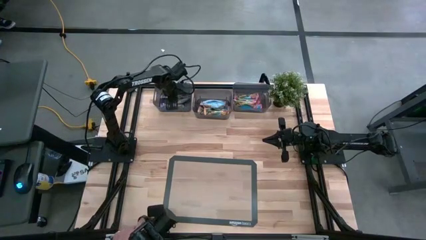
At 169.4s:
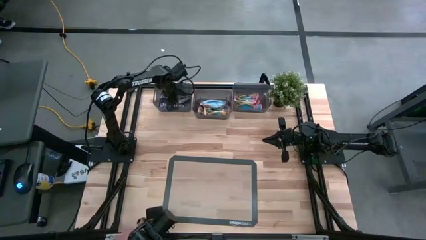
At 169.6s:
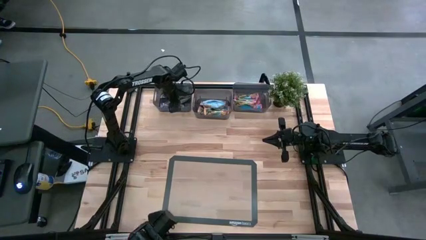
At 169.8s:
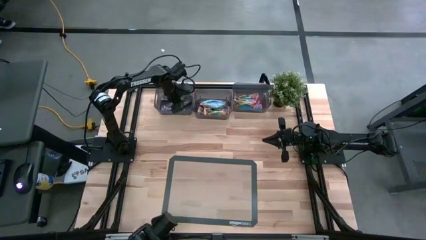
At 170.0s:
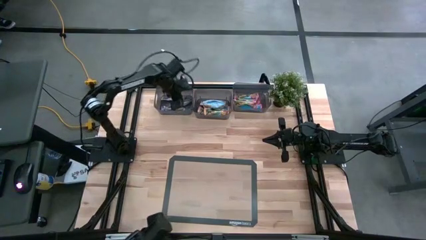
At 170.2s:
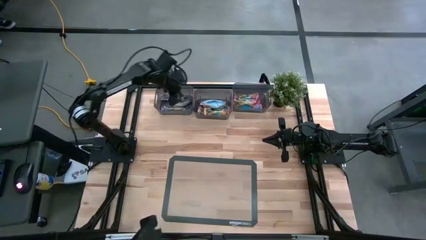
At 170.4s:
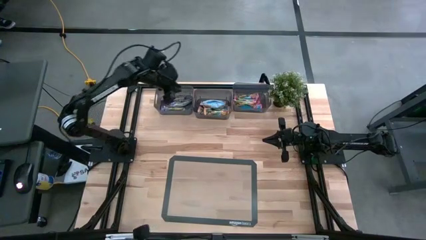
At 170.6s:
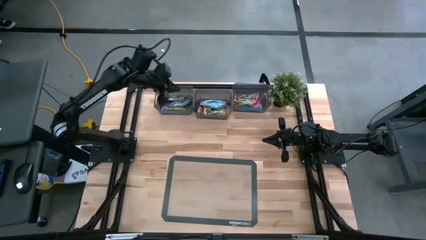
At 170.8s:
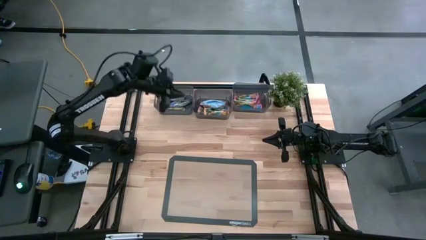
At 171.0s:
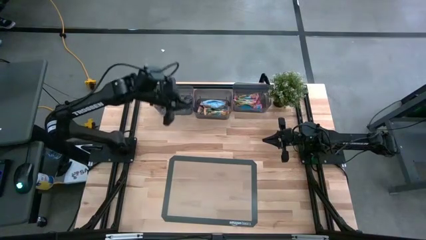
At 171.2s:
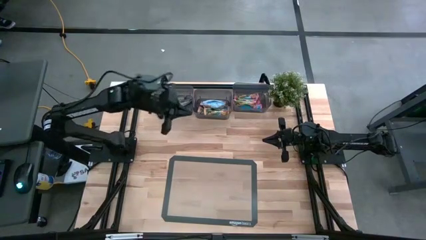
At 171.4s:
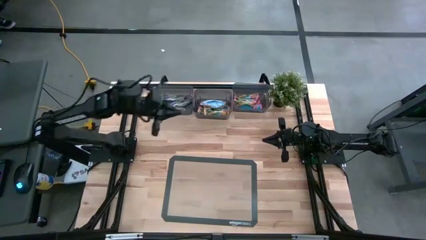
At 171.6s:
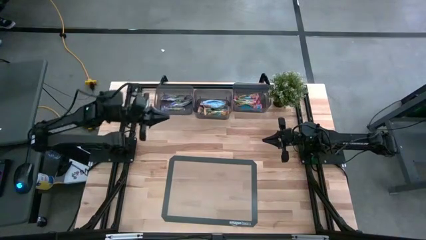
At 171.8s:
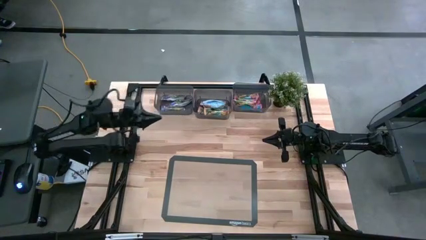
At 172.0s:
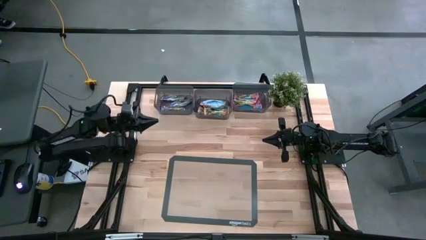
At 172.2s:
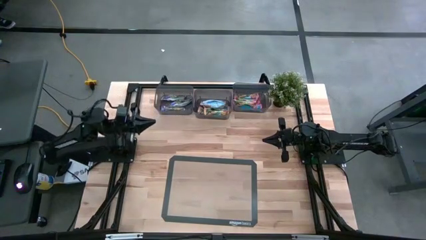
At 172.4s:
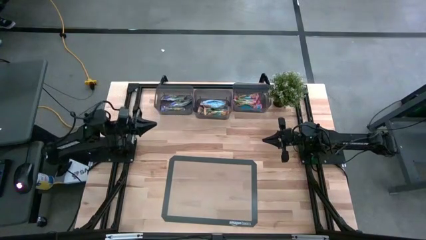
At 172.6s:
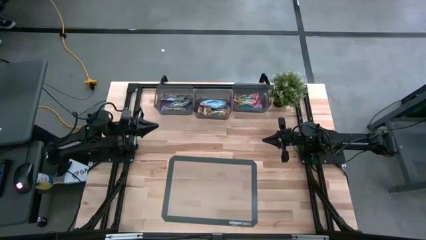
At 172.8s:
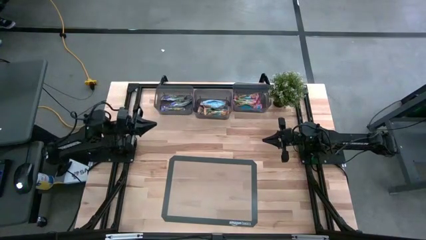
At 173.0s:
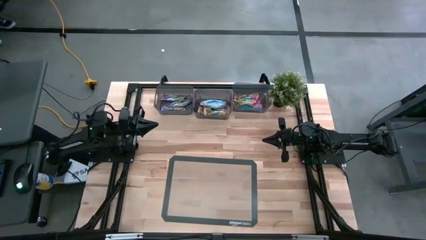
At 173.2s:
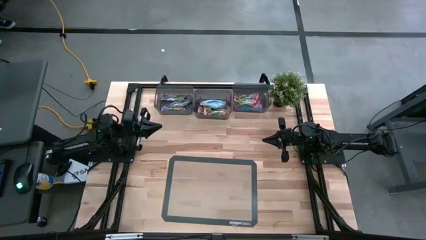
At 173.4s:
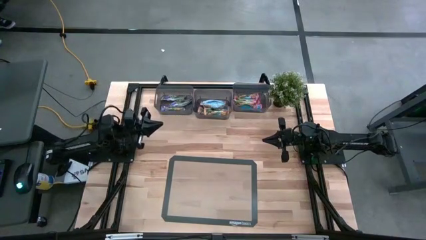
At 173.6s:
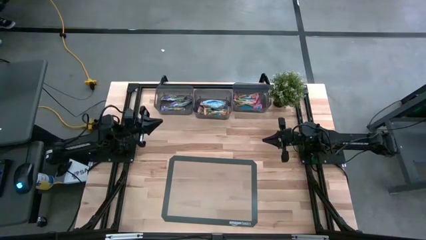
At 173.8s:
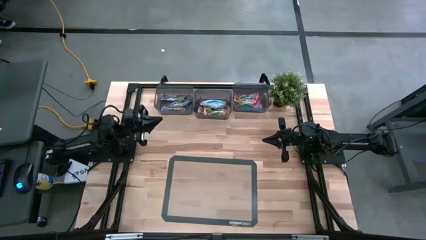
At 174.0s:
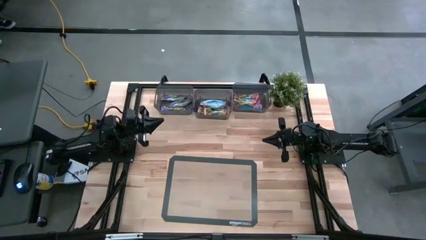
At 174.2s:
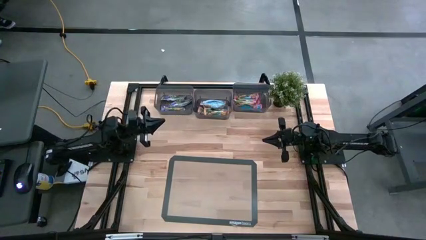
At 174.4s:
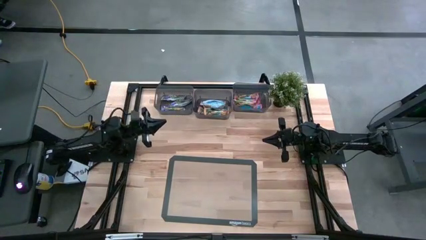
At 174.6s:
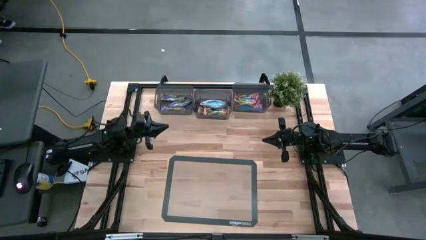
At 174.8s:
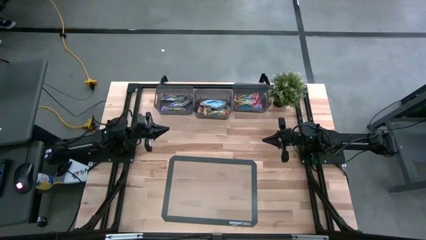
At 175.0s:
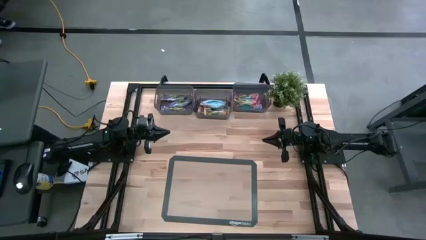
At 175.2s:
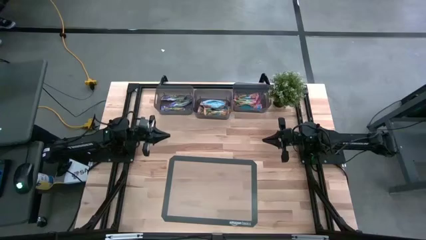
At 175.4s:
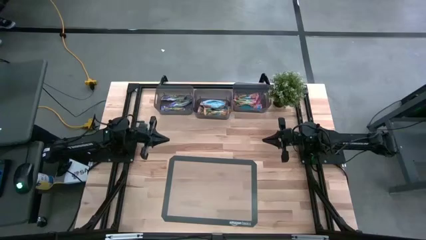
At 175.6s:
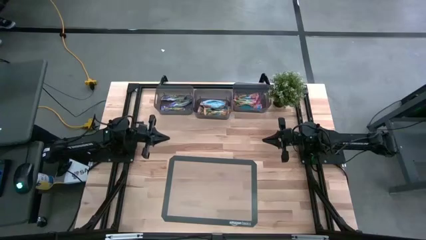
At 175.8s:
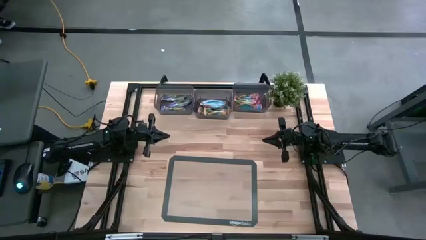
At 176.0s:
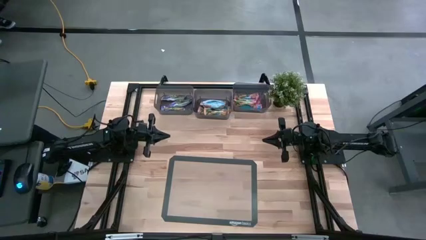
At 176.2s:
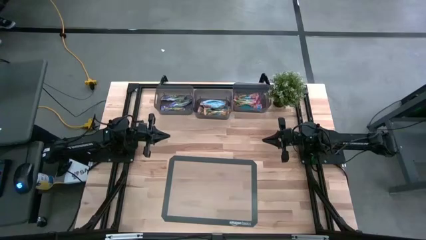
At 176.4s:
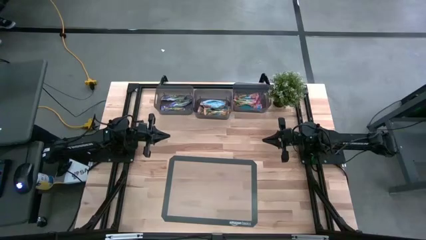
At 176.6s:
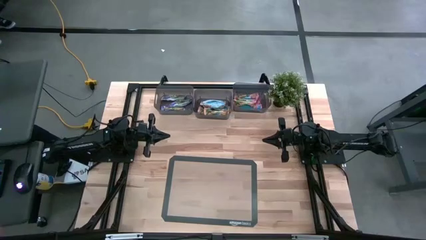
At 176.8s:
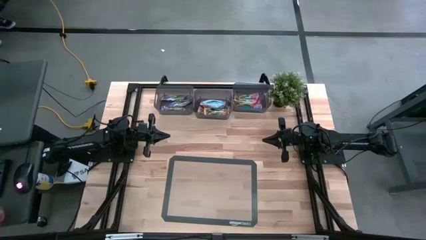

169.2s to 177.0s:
Task: Pick and place Granola Bars by type
Return to Home Position

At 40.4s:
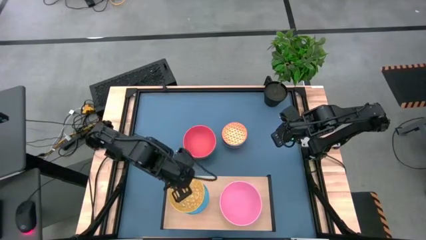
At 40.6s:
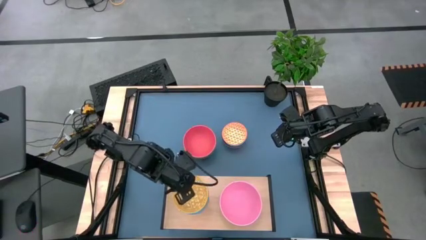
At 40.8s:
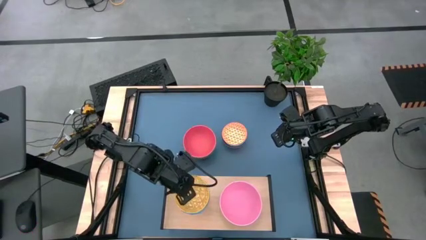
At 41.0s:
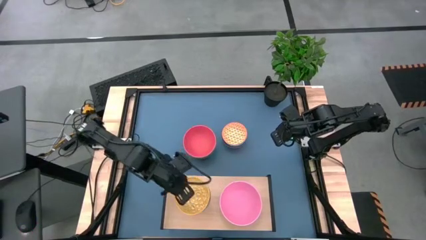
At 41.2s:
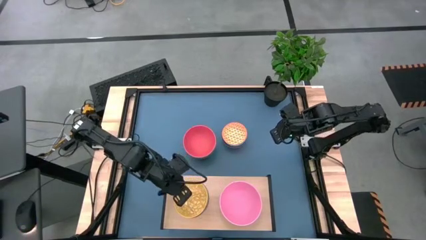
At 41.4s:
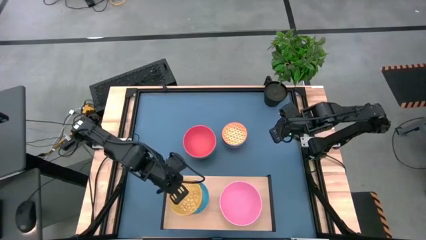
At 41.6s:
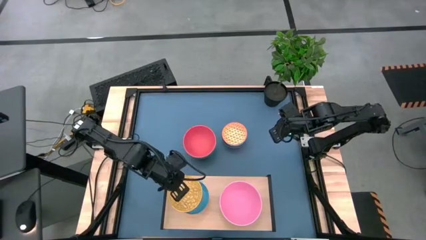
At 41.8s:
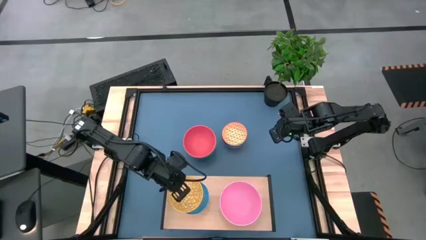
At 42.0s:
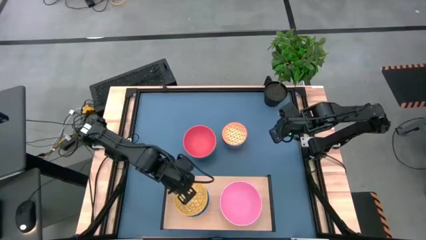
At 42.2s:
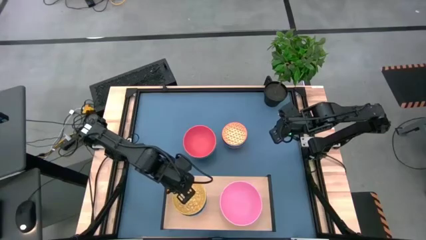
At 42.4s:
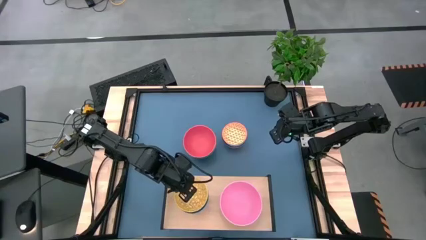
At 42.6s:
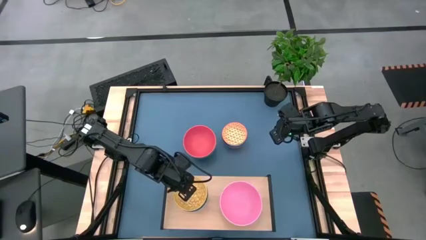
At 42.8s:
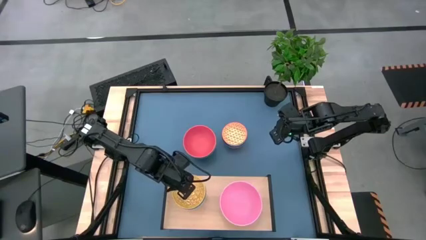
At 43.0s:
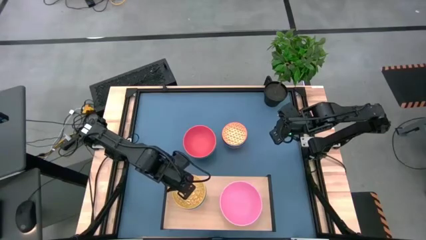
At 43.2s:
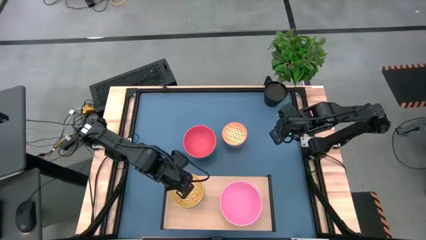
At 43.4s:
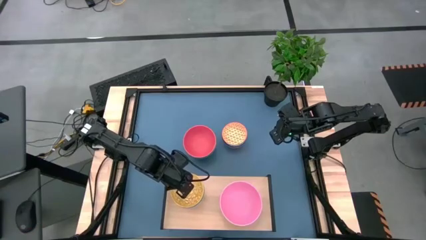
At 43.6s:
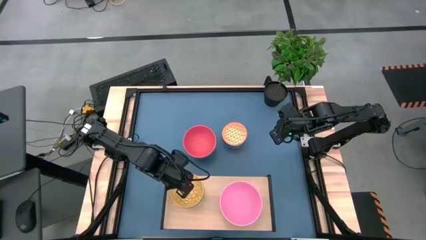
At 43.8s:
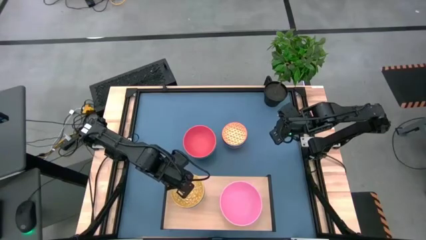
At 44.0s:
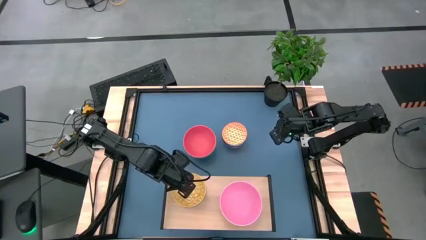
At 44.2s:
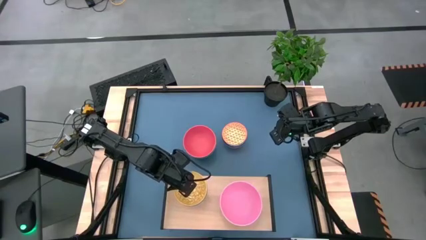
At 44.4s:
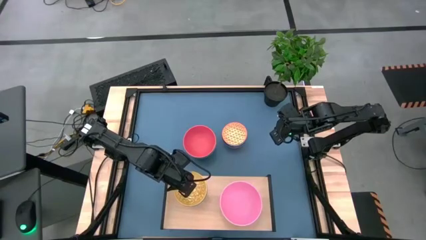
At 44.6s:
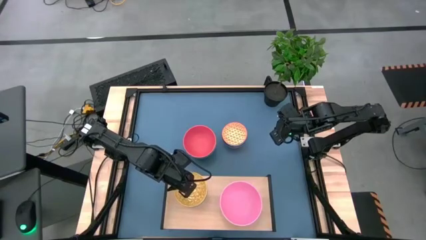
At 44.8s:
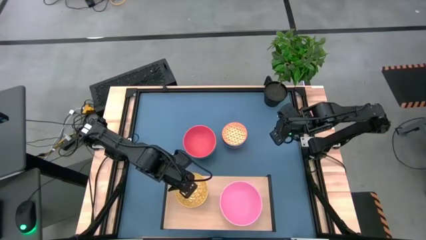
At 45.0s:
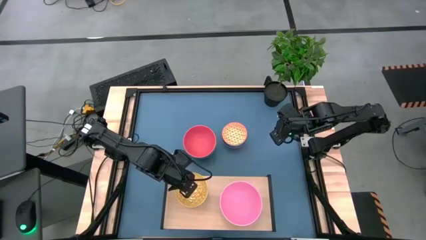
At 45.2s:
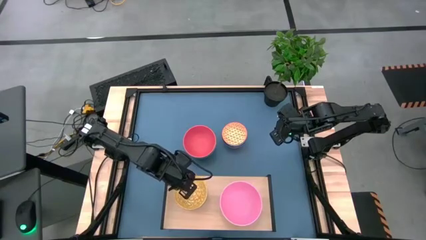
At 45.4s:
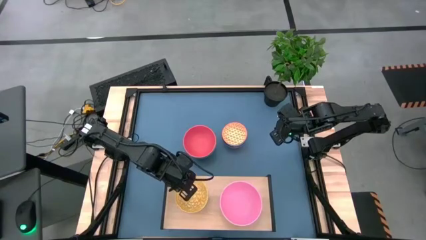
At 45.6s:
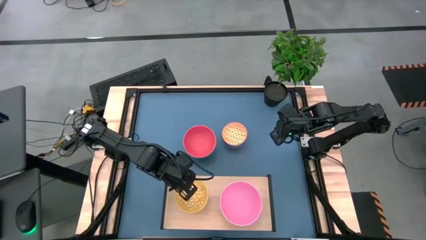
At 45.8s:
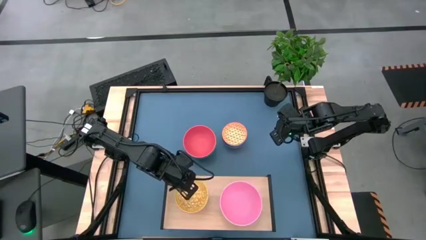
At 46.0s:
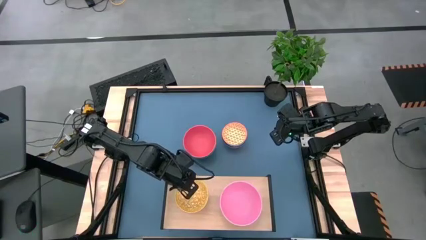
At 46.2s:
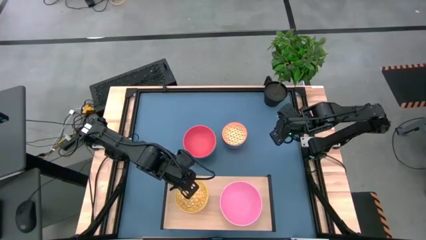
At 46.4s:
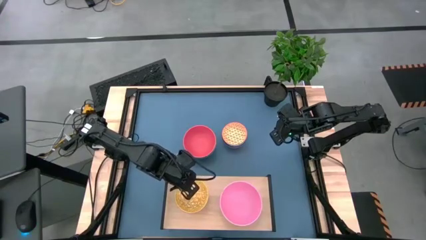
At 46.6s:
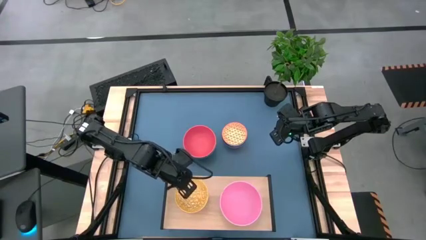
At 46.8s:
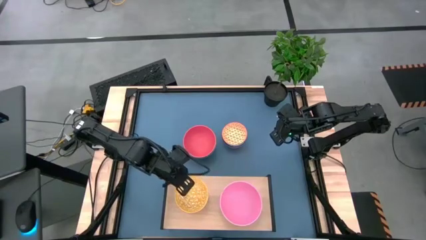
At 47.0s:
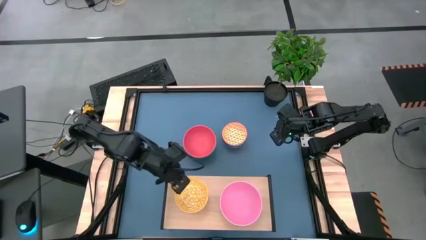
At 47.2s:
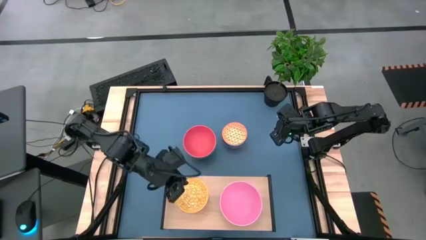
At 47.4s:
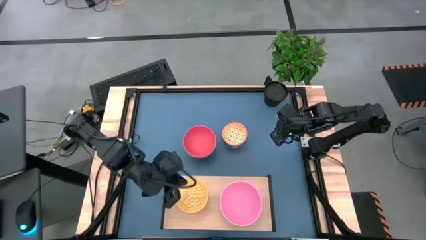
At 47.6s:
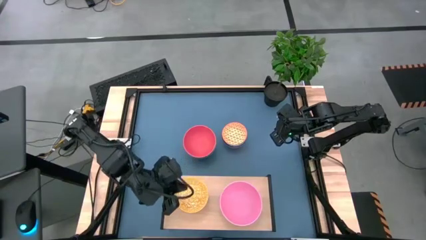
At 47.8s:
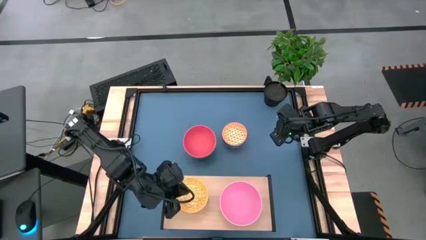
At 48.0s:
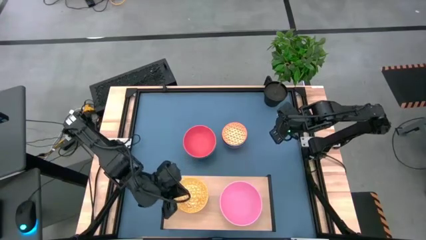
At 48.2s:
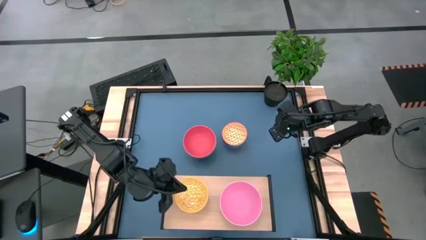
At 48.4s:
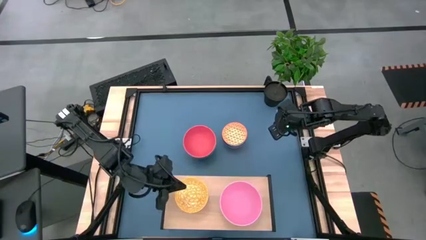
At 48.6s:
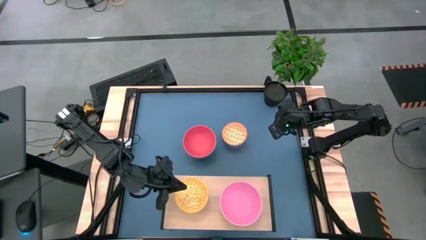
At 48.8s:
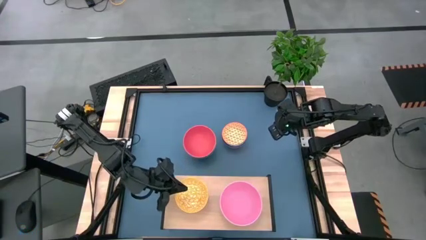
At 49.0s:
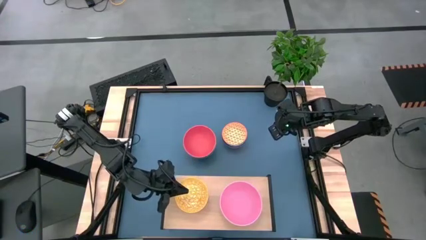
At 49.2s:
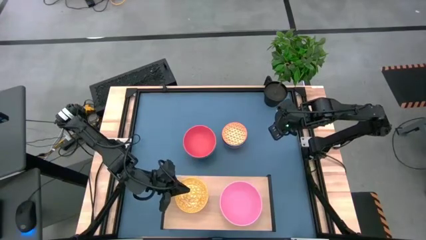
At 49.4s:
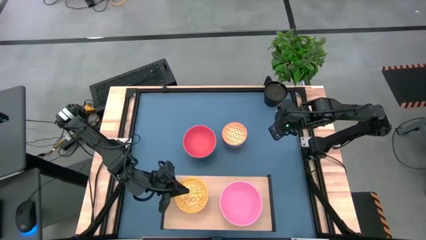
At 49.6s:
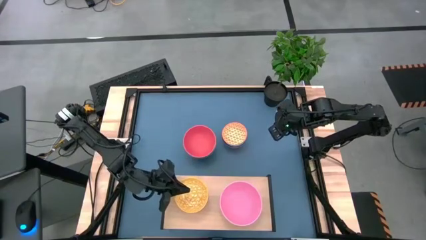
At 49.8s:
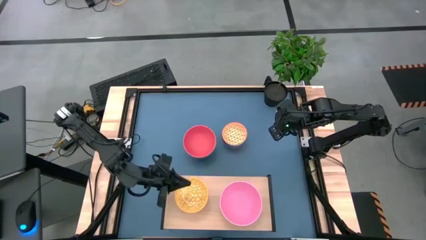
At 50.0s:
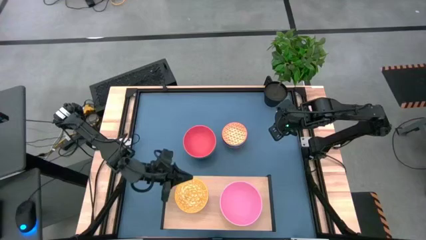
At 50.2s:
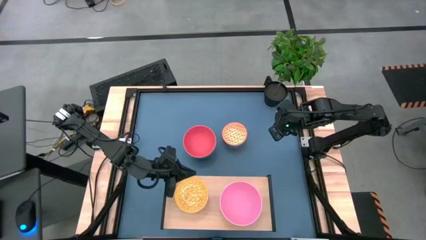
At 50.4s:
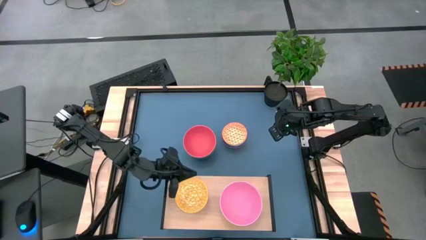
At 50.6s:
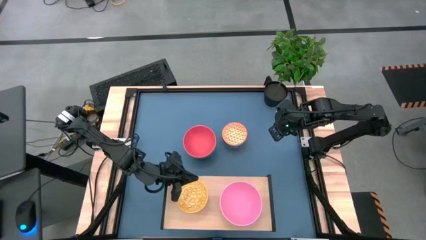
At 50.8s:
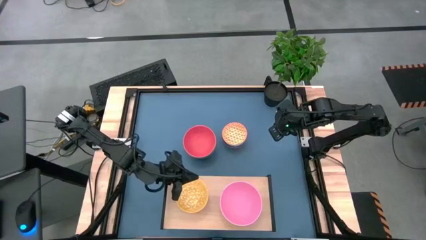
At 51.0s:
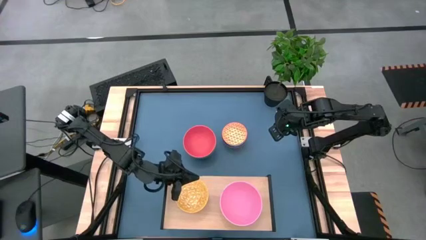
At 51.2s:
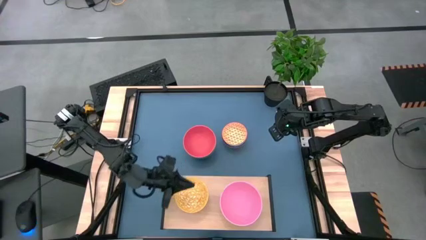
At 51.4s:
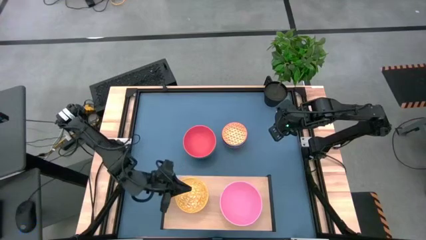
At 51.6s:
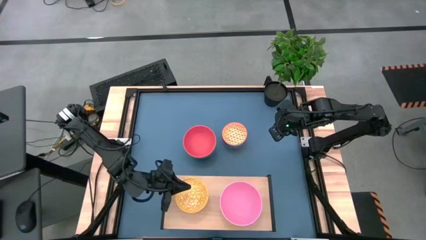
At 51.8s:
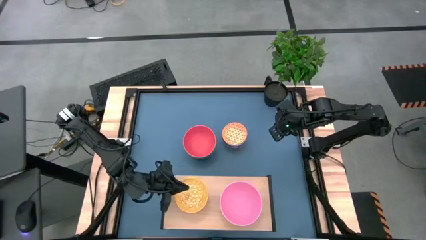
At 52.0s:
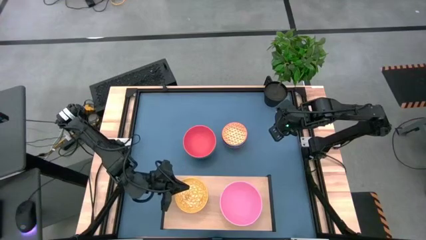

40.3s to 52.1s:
Task: Place and stack bowls onto a shelf
Stack the yellow bowl on top of the light blue patterned bowl on the shelf
